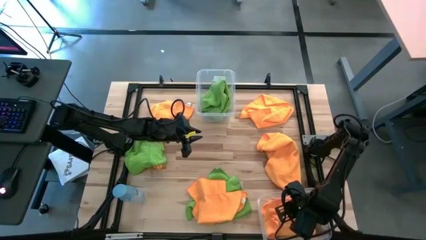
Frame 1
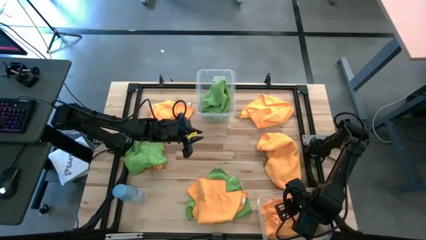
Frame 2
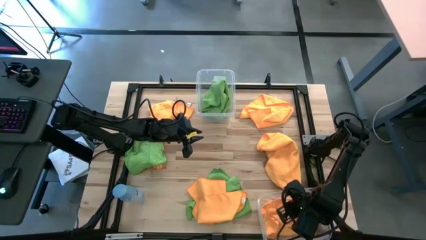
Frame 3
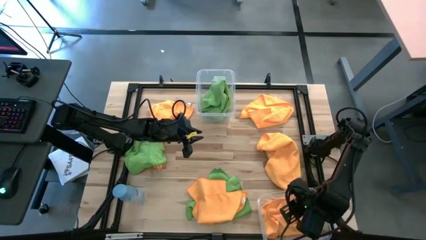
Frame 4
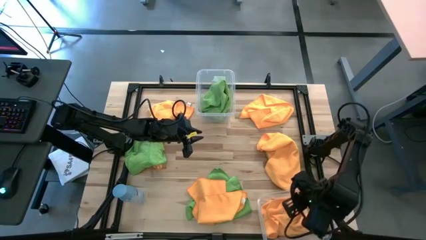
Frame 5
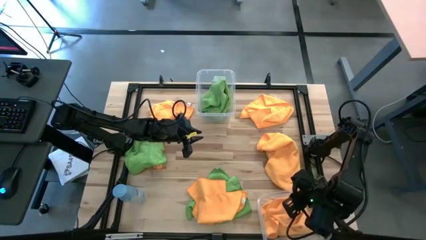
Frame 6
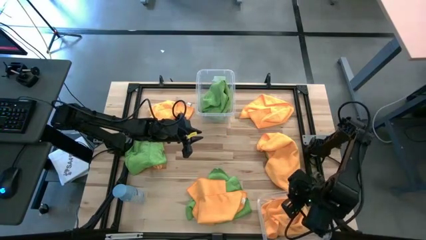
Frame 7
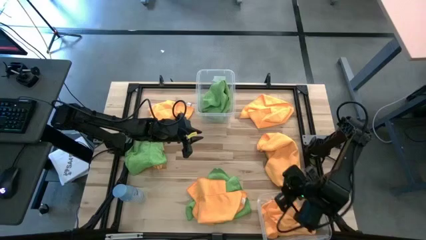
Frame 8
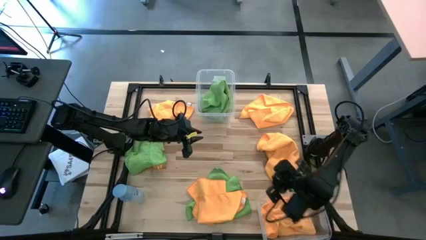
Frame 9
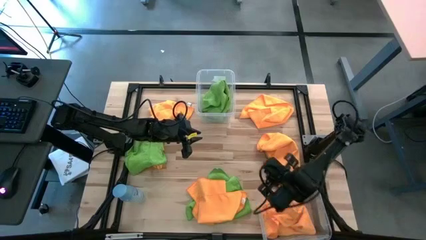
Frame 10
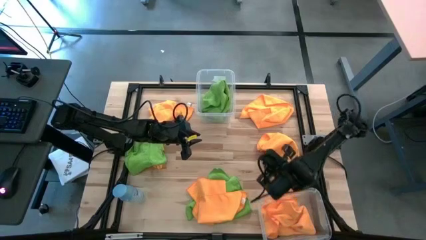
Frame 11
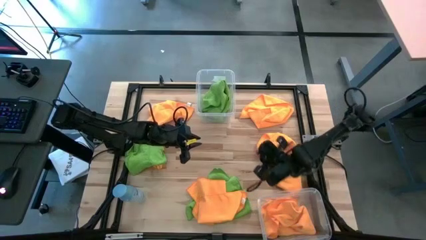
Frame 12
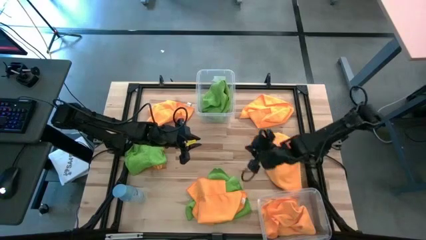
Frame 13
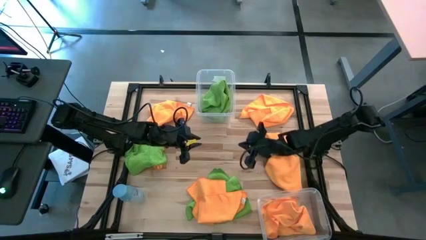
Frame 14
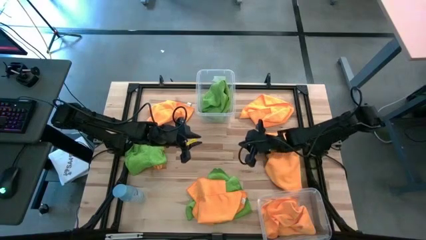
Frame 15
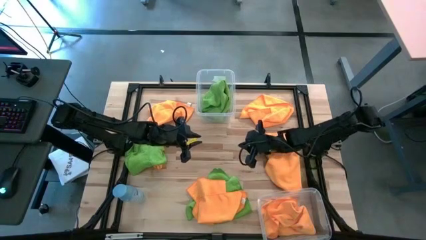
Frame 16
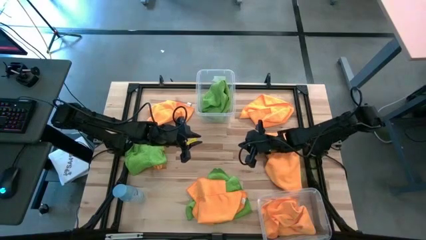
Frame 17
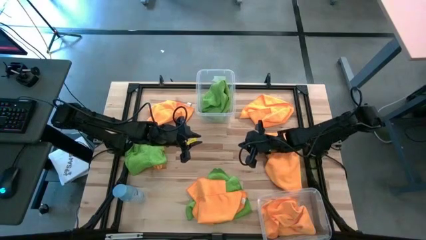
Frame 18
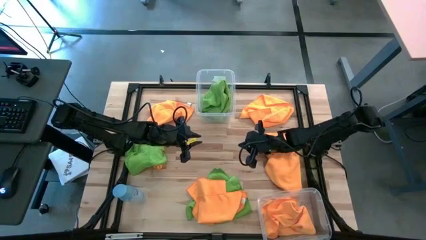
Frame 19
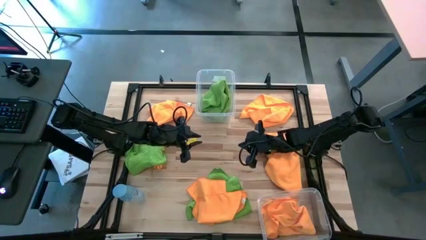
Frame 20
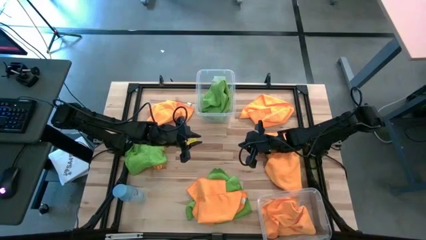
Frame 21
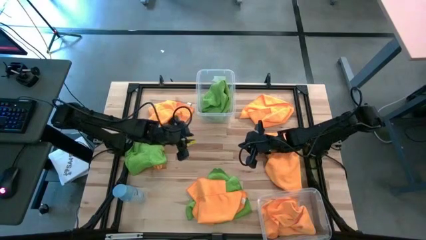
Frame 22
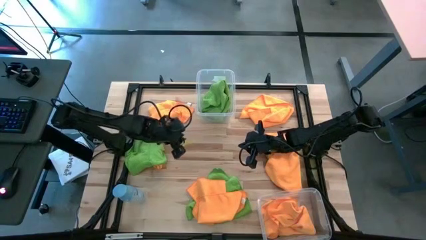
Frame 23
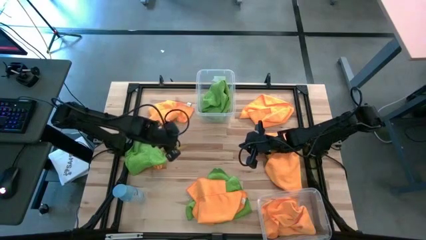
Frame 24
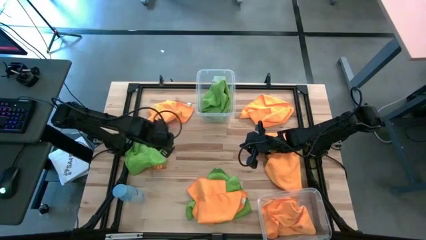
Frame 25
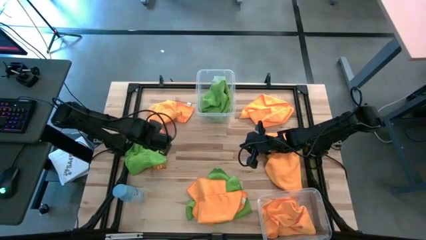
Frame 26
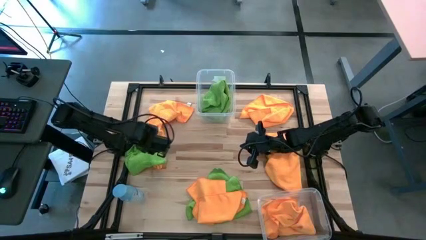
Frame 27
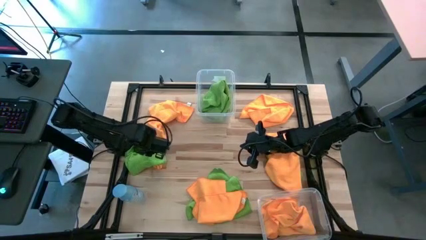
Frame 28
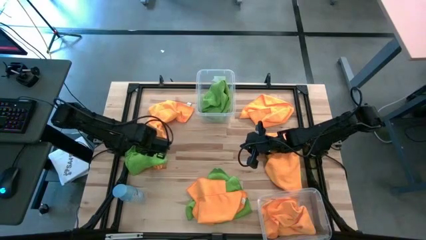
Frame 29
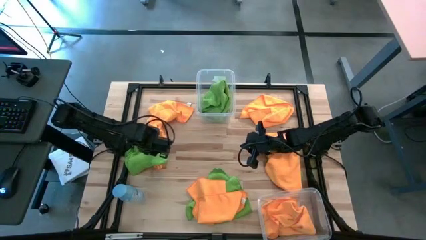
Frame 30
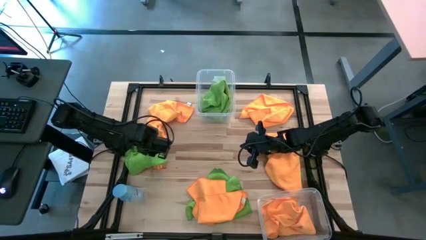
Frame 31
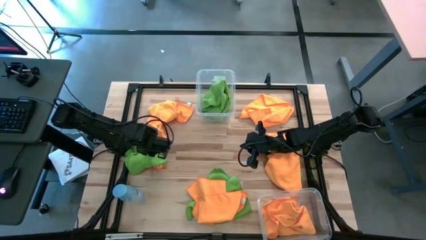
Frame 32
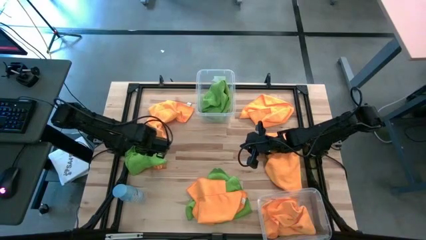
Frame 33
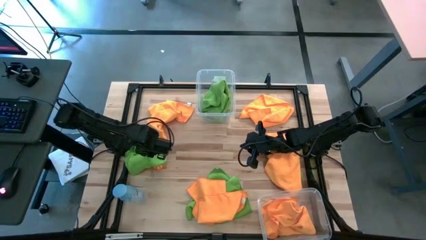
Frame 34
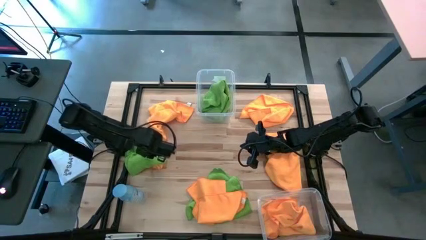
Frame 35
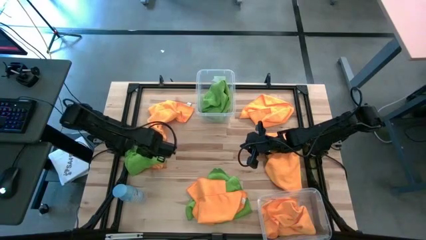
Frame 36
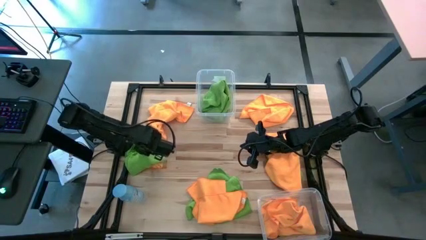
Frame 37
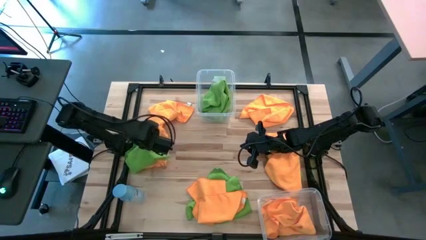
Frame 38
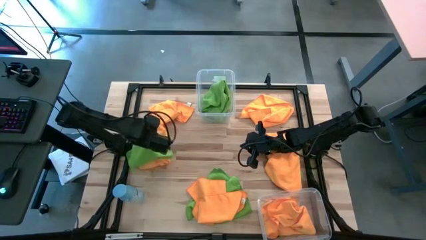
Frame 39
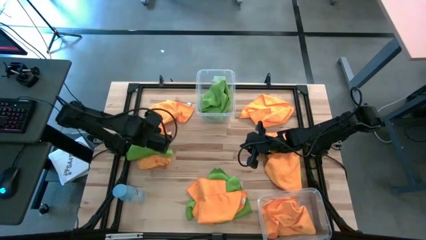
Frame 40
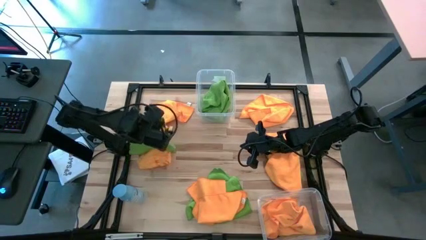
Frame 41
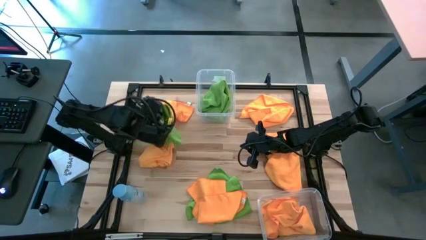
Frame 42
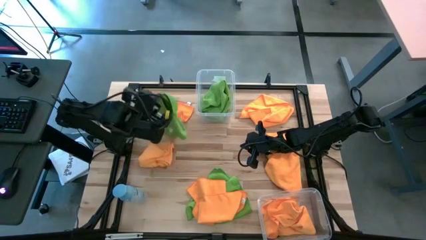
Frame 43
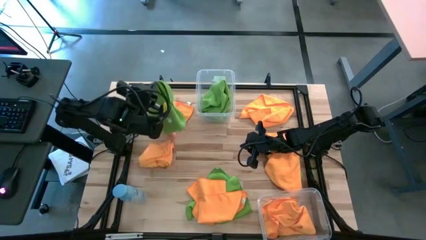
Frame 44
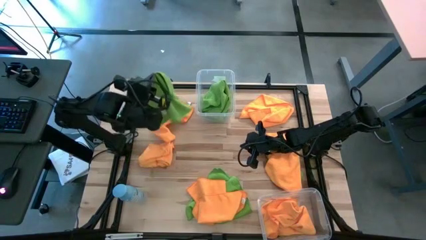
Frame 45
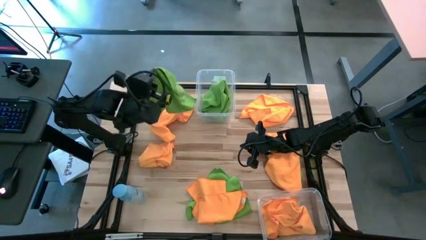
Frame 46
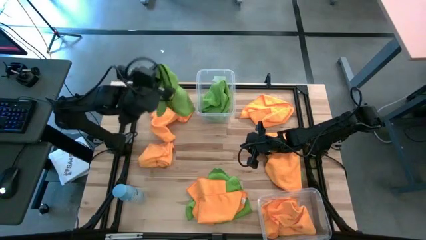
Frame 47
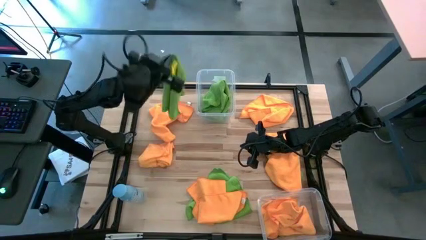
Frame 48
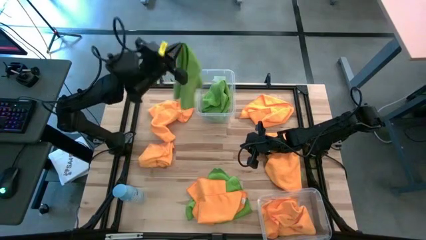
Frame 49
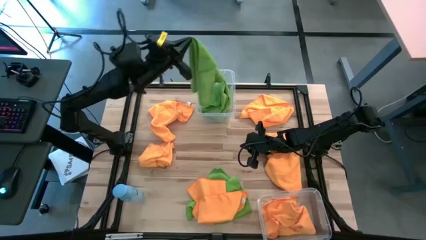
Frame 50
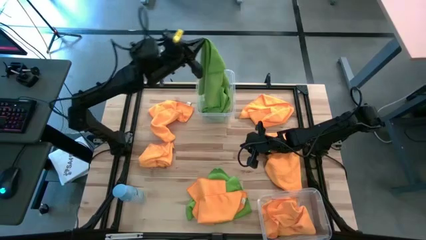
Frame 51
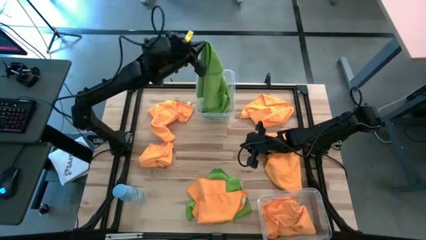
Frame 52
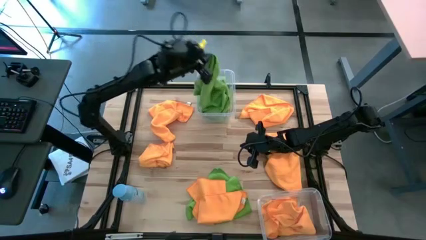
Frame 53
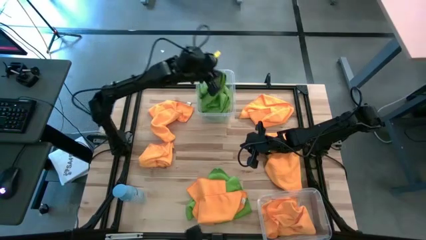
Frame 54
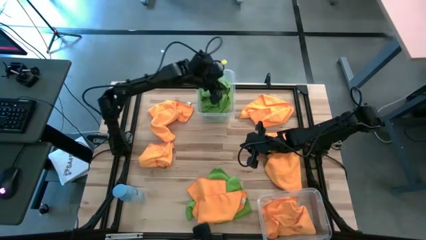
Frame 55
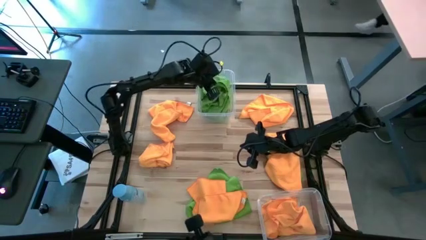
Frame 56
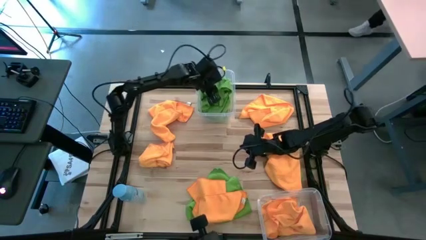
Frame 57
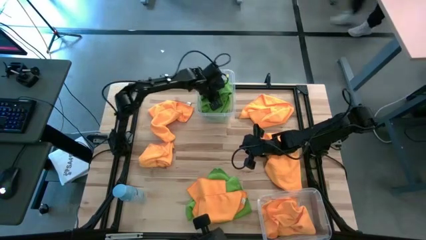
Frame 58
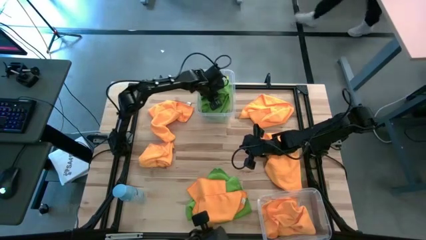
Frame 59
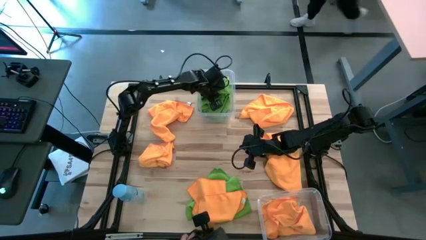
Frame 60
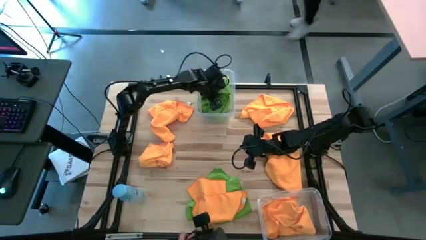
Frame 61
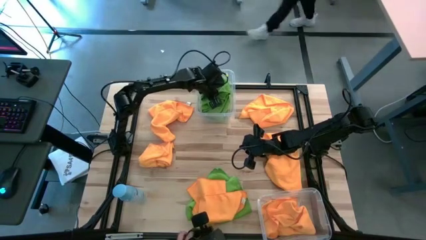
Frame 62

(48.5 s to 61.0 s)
Task: Sort microfiber towel by color & place in baskets
Put the green microfiber towel into the top transparent bin

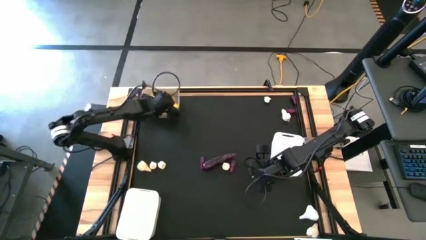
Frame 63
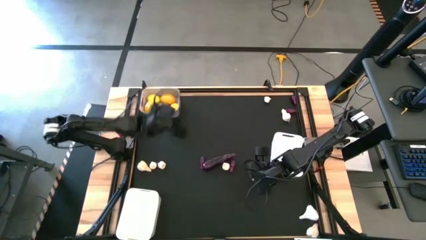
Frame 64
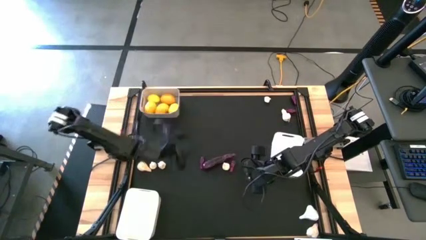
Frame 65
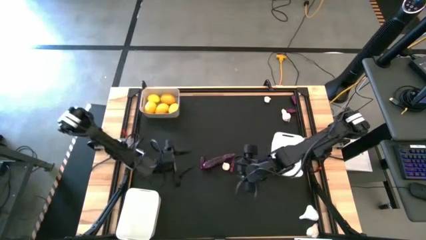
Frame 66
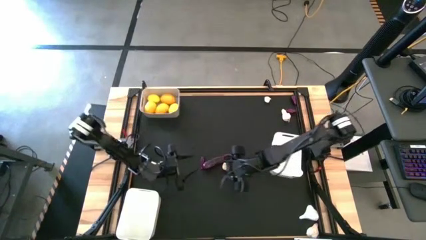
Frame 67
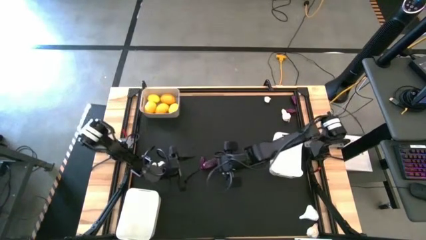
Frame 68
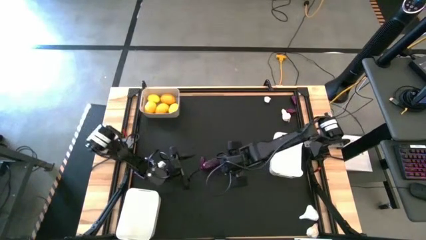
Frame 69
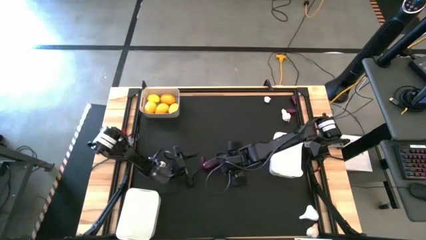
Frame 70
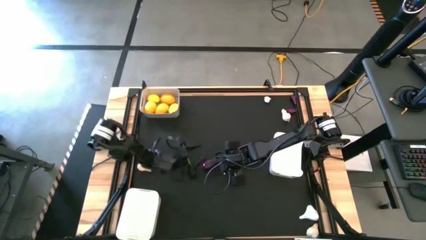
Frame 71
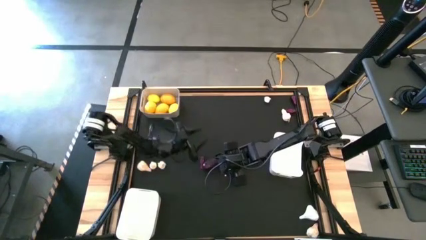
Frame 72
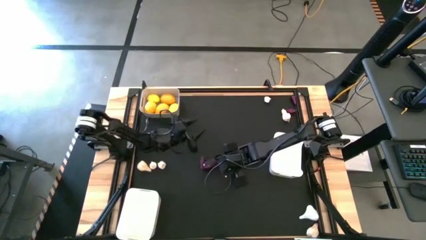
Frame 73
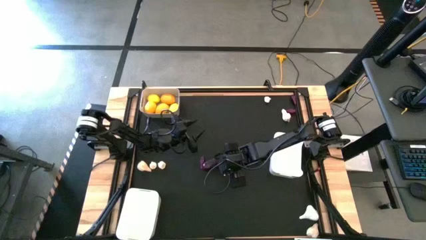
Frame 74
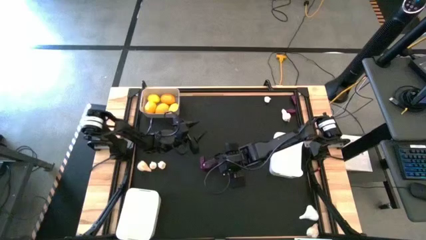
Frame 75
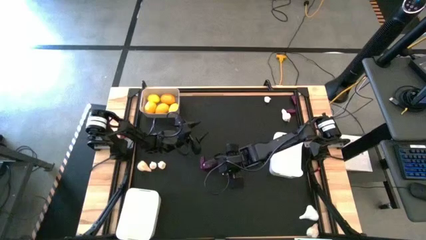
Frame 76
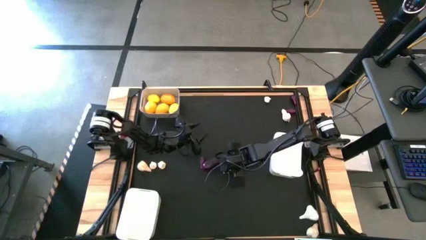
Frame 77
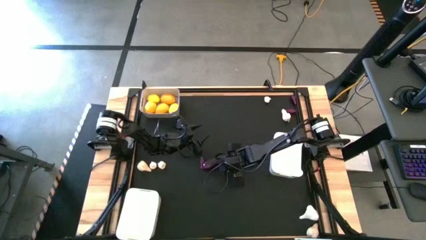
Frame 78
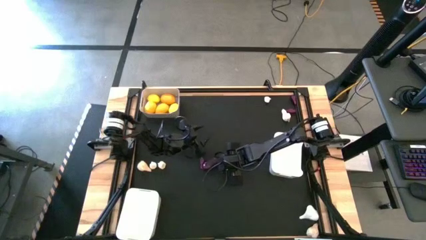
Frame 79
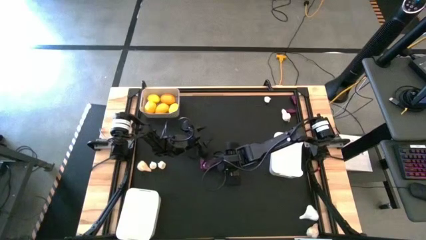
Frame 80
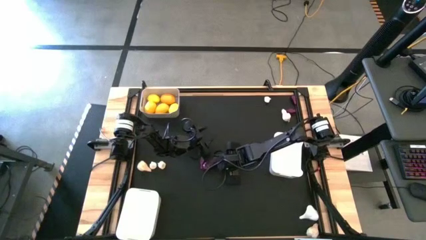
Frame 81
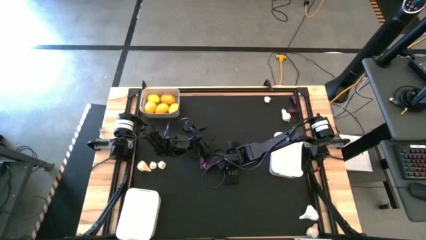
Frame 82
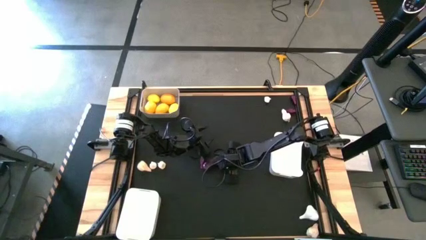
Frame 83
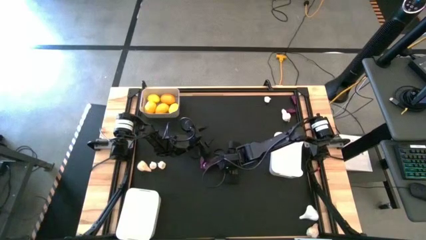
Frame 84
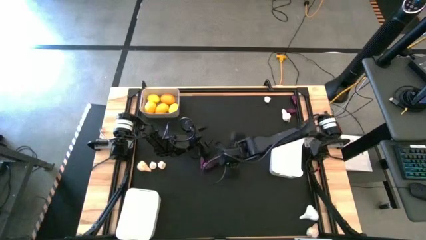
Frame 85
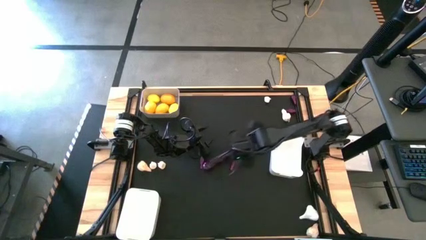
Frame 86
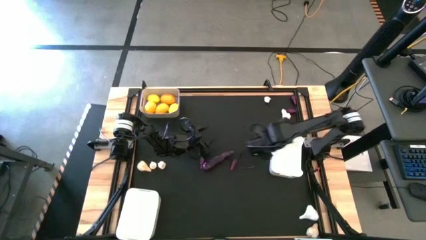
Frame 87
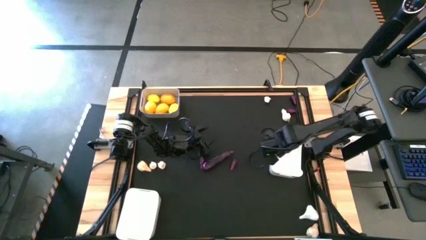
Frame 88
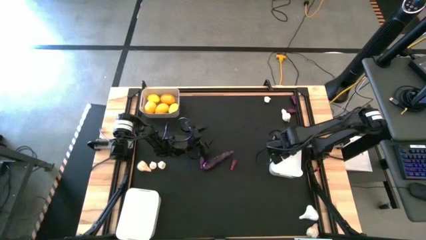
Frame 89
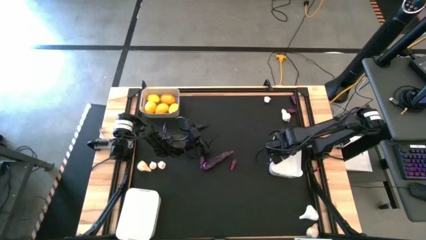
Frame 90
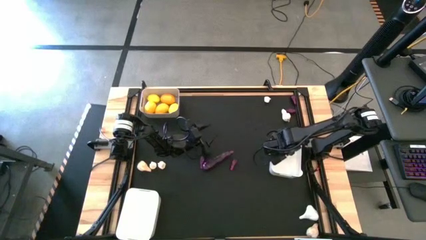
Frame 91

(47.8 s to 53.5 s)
Task: Sort produce into baskets
Put the center garlic into the middle right white bin
